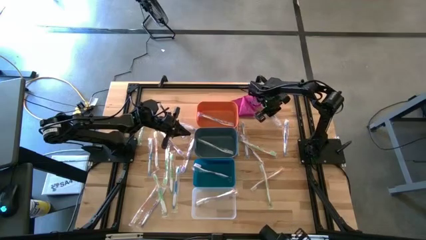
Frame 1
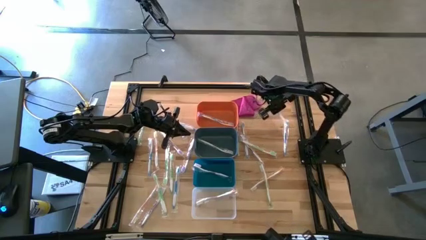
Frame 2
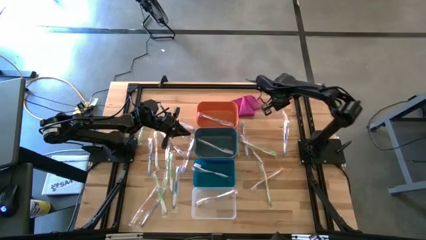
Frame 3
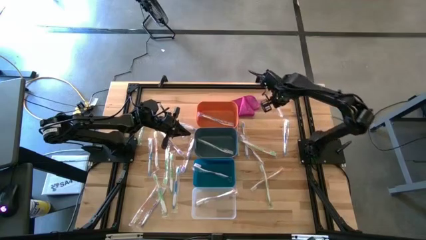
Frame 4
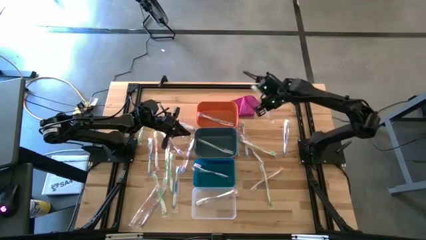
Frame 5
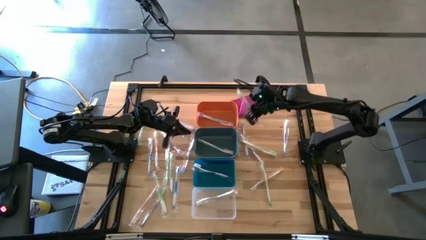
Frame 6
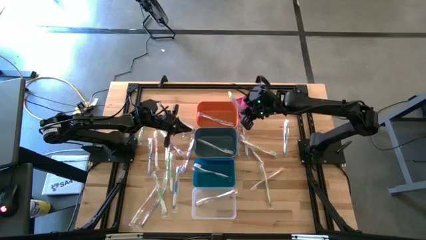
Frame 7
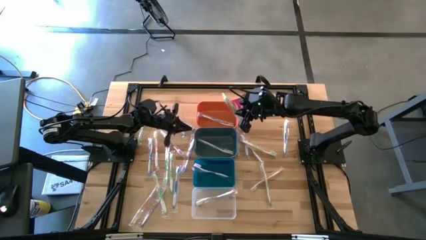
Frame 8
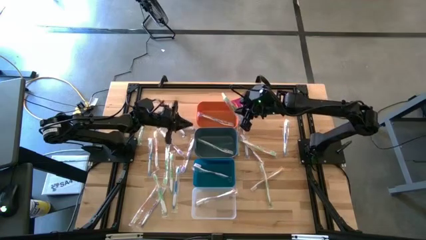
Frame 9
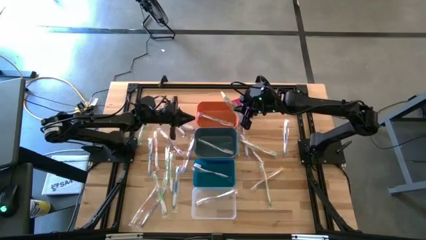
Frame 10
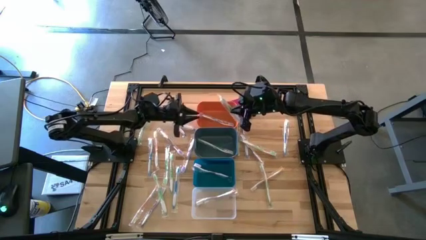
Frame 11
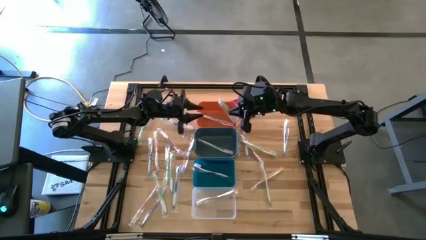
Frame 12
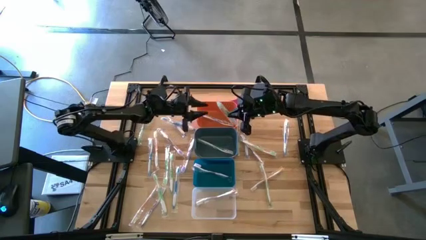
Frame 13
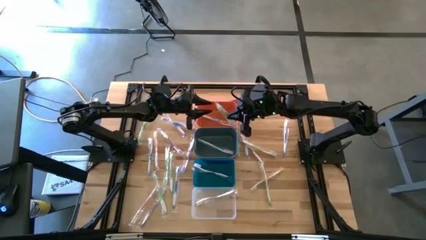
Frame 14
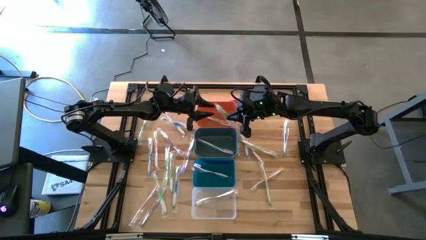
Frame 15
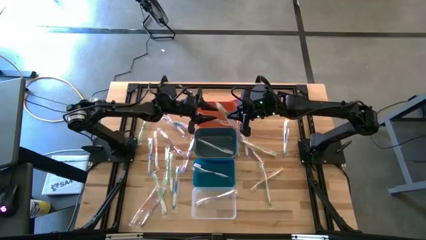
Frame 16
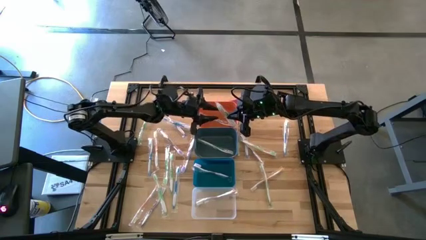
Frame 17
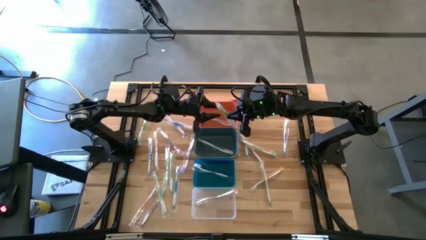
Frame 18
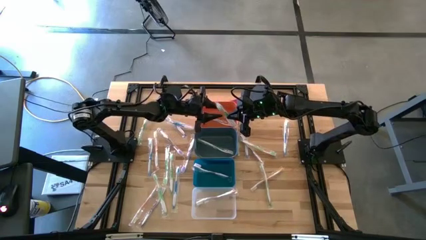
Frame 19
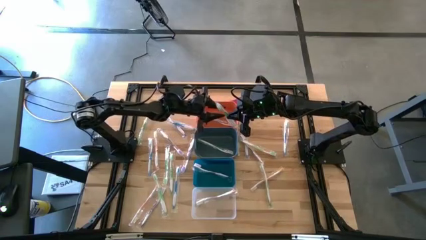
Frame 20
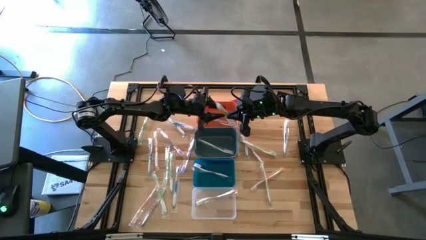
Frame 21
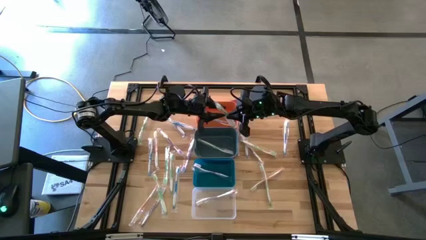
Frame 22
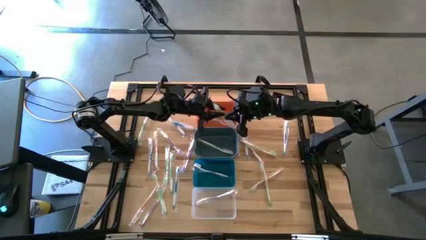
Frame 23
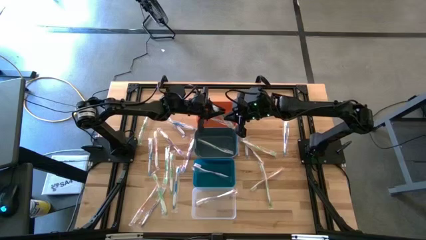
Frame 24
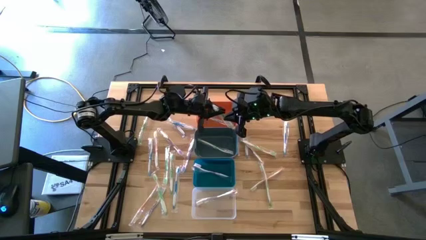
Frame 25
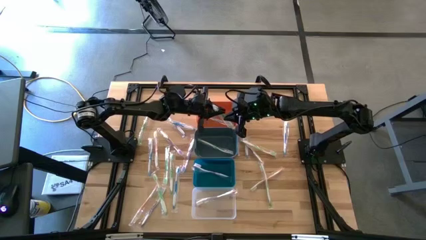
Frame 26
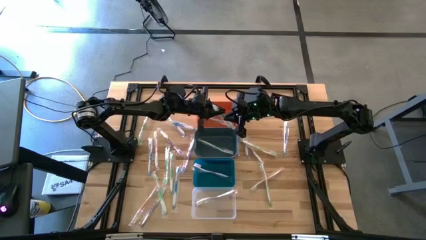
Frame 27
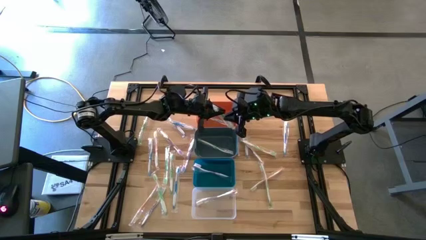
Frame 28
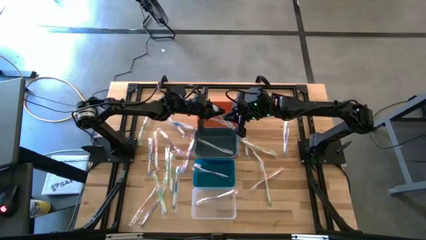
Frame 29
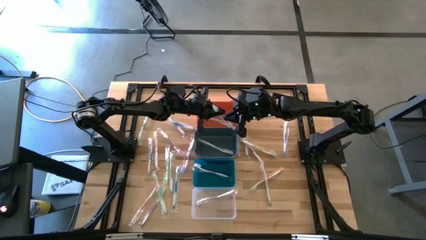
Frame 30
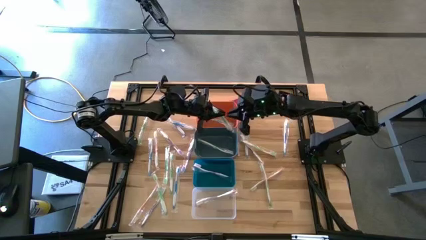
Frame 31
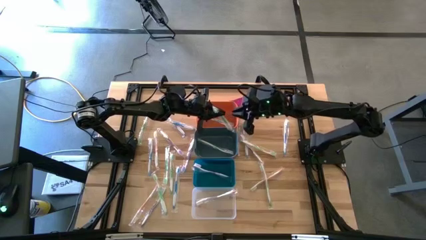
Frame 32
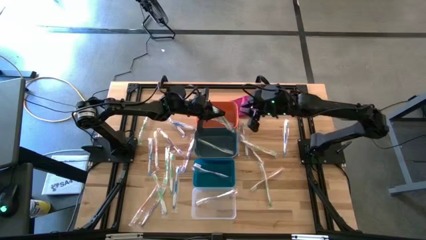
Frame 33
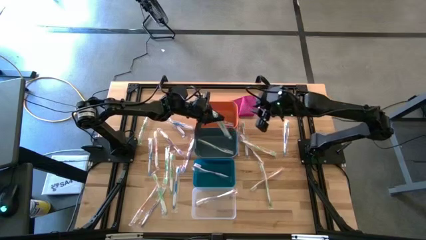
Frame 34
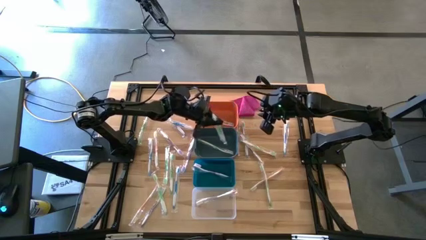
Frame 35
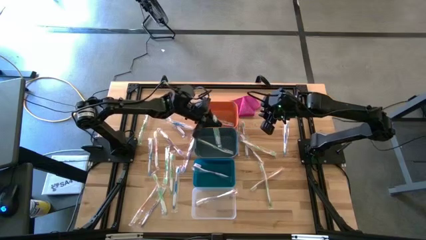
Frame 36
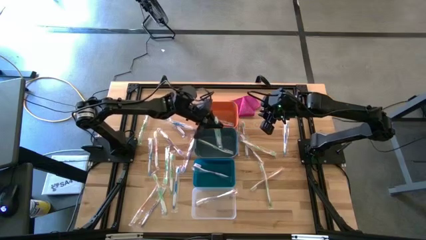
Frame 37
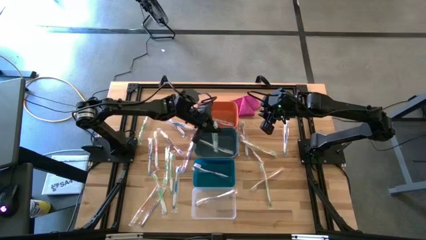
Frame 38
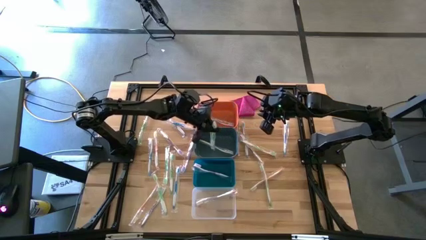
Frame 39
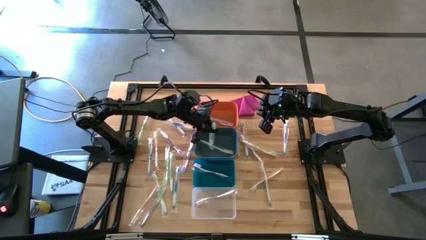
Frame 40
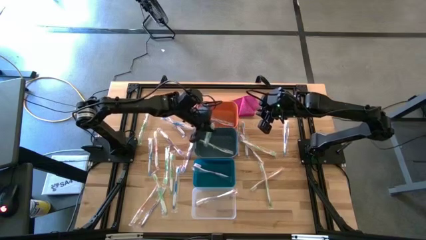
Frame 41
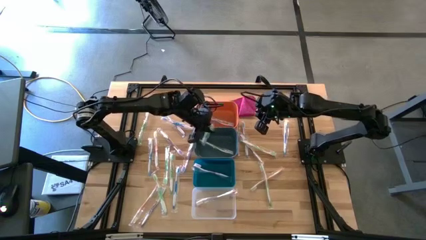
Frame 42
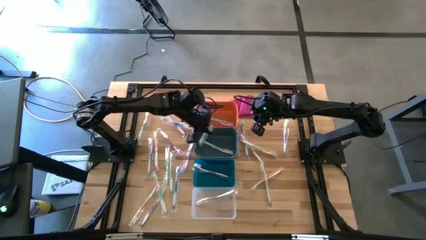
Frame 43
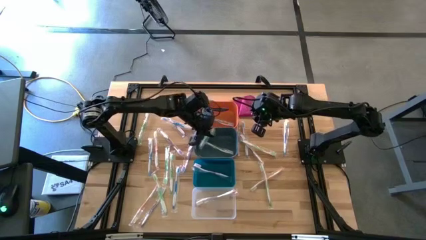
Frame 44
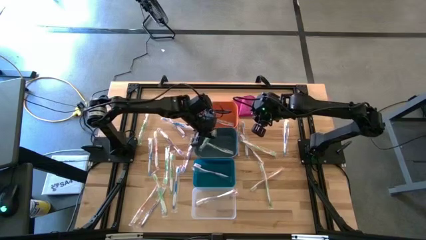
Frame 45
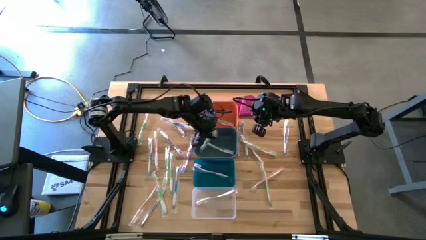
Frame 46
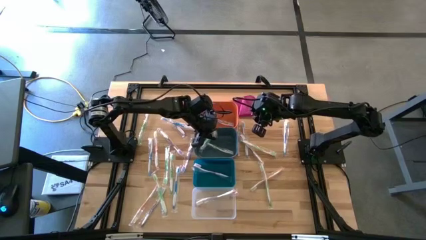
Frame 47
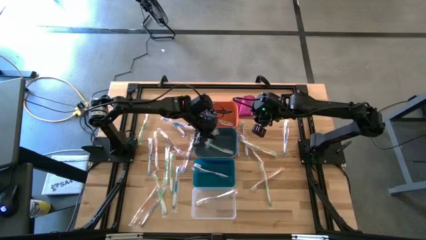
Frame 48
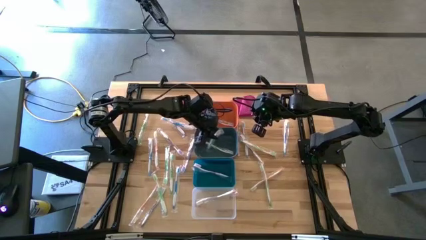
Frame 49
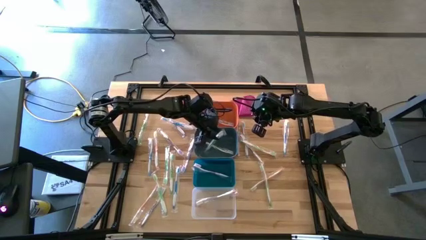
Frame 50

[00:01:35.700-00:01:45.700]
Task: Pick & Place Toothbrushes
Put the green toothbrush into the green bin

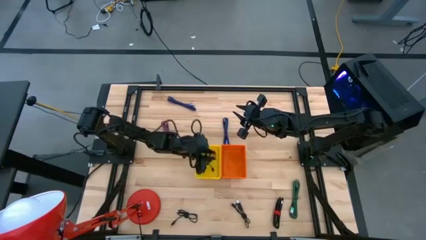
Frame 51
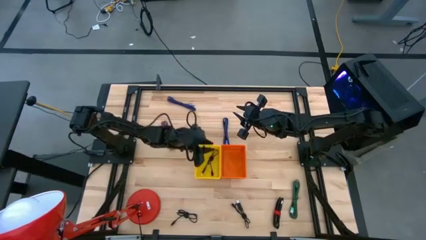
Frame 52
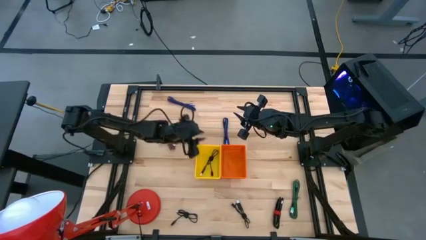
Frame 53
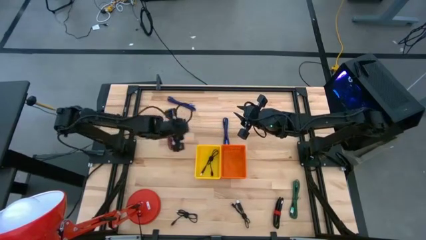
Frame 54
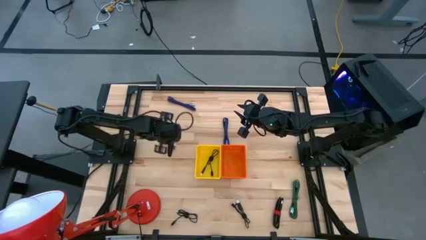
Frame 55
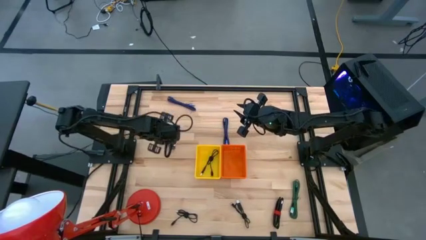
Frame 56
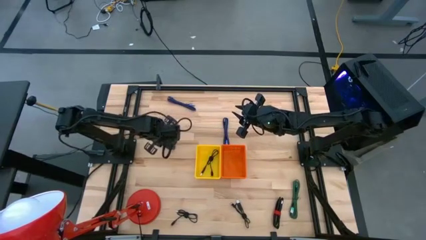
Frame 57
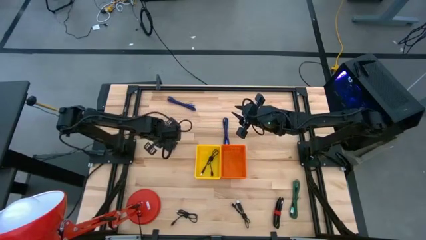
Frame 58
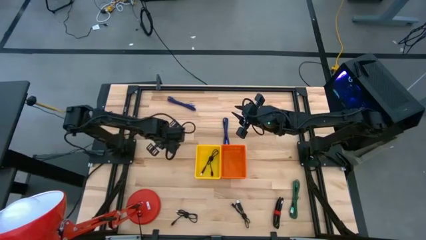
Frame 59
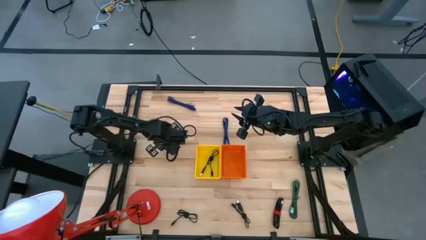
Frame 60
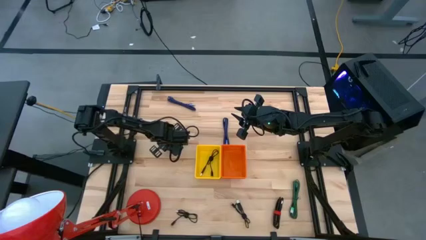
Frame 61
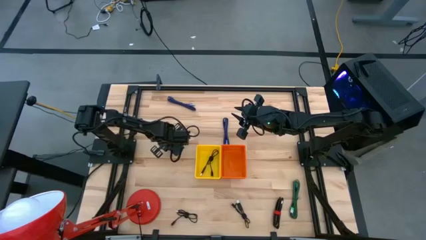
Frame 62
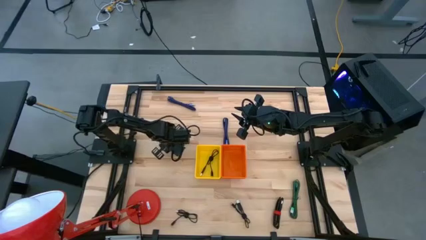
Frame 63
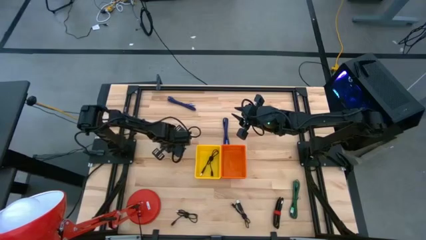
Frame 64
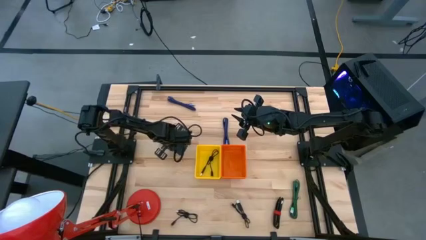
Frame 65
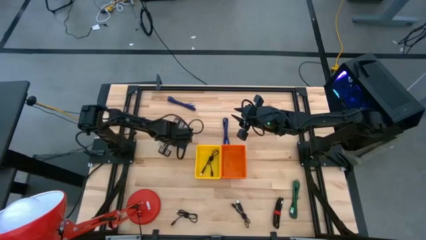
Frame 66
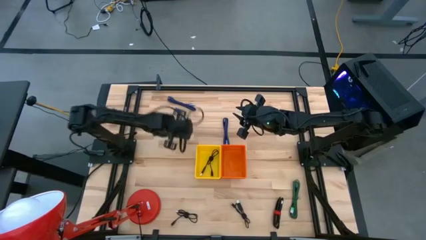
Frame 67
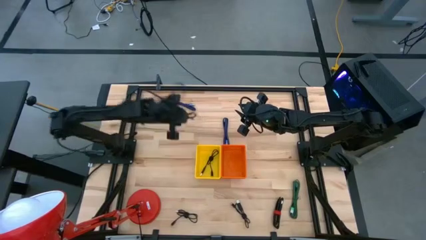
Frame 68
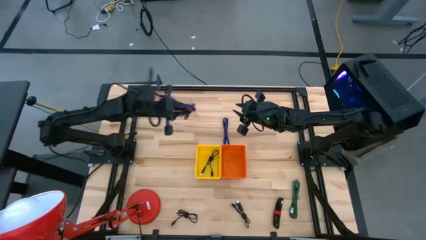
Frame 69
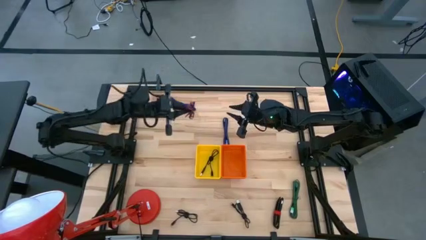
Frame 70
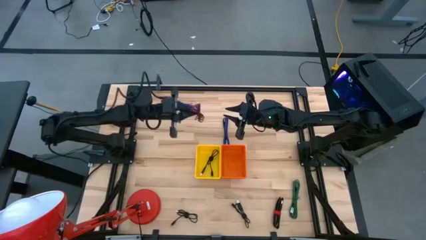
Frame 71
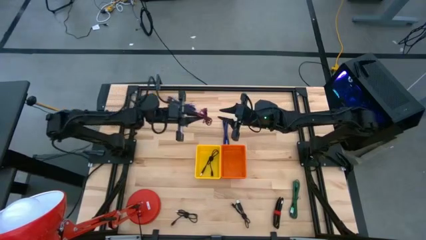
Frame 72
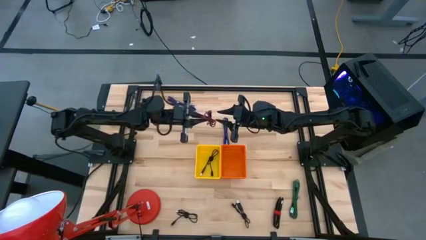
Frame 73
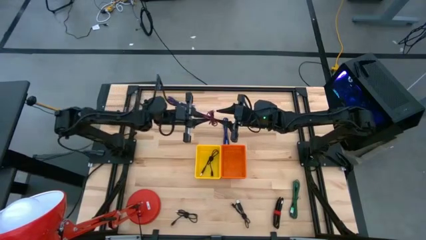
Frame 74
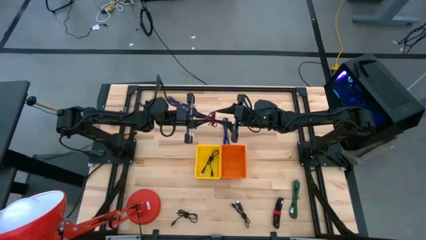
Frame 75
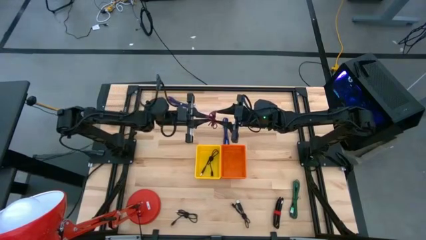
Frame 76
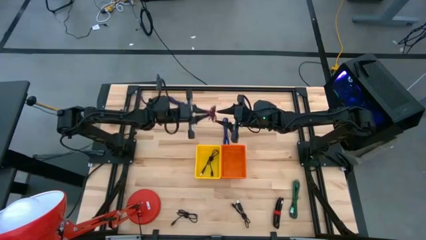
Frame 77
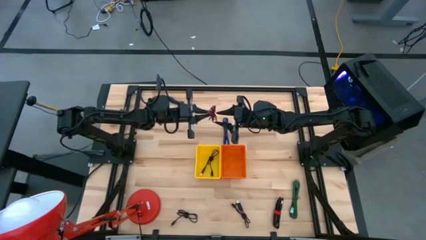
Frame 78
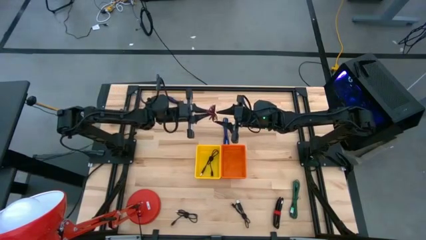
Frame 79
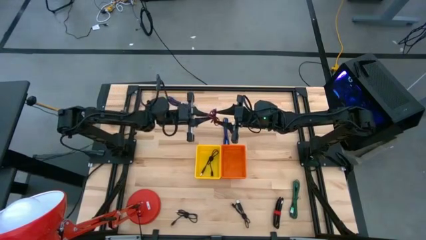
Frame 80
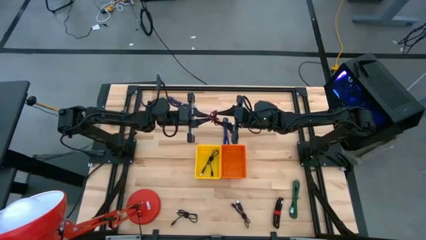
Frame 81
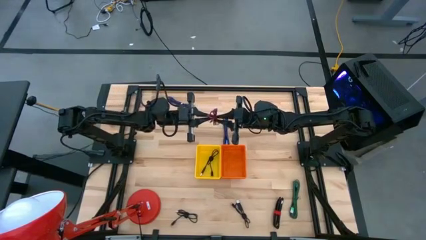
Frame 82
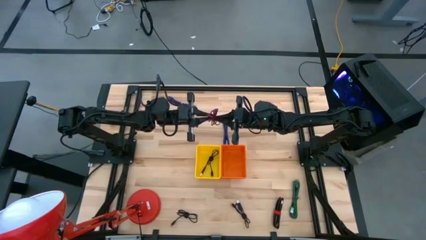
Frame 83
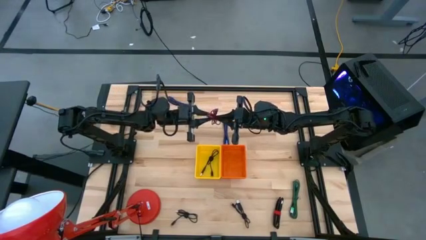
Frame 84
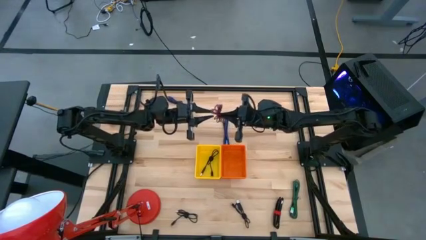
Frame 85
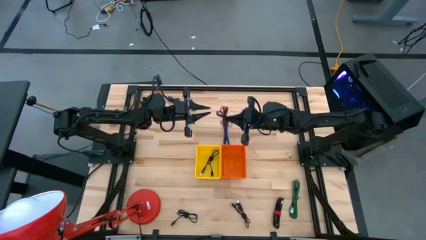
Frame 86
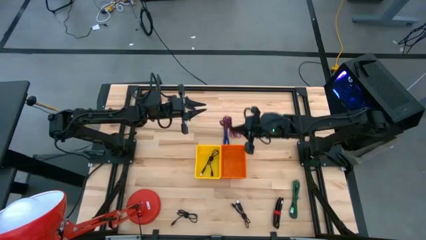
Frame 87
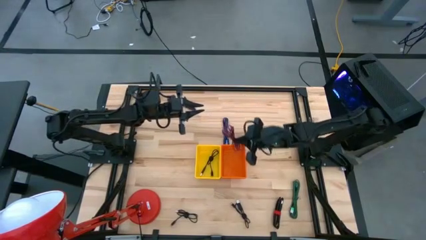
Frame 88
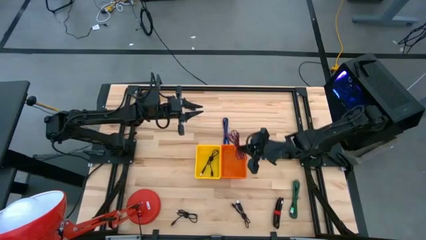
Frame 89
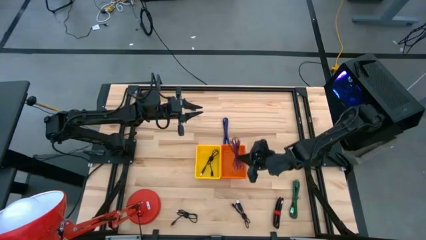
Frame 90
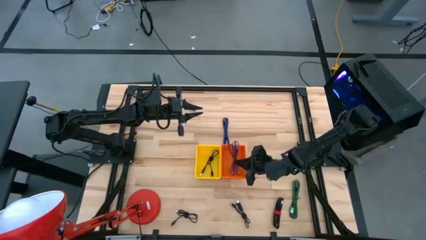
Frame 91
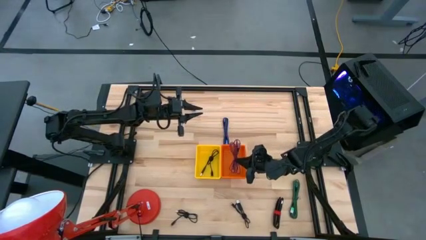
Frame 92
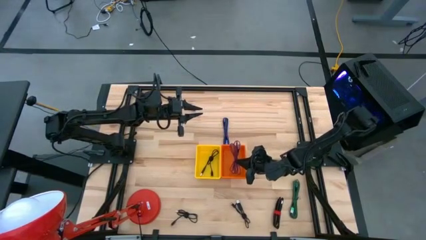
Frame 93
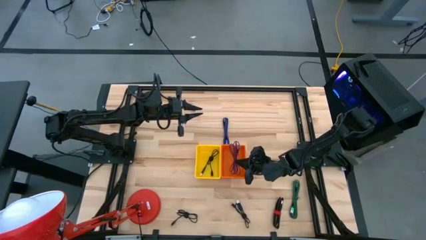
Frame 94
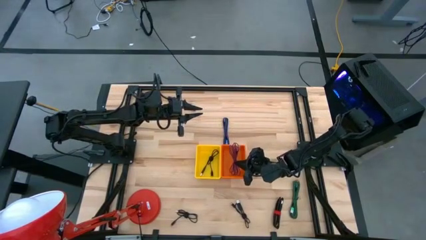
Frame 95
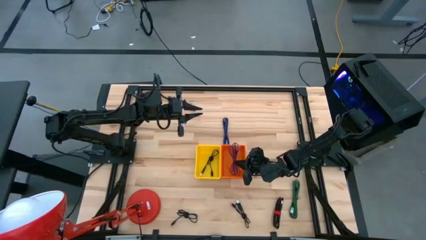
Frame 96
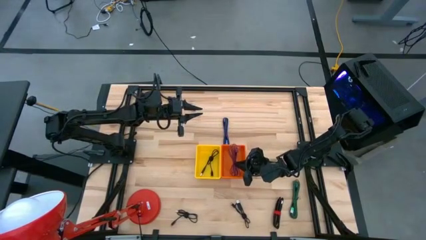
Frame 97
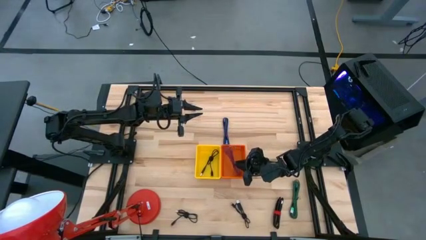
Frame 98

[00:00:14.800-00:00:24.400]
Task: Pick & Place USB Port
Put the red patterned charger cable into the orange bin
